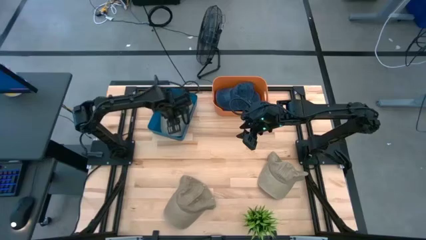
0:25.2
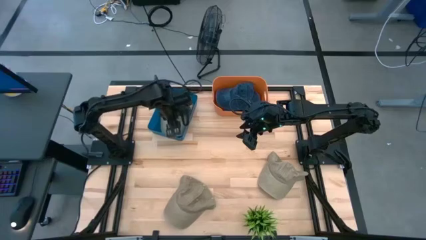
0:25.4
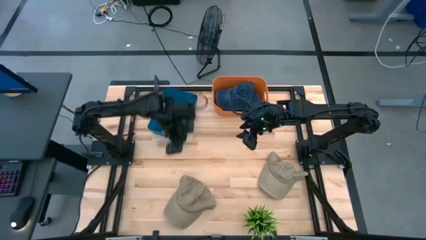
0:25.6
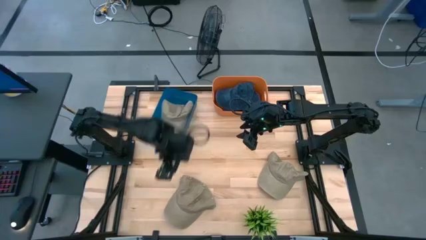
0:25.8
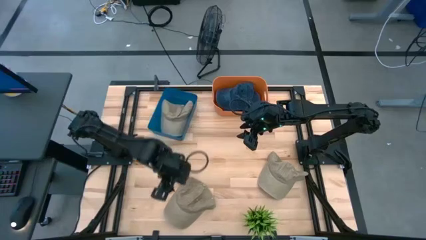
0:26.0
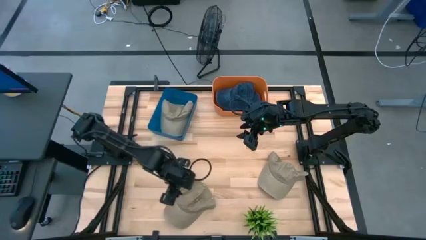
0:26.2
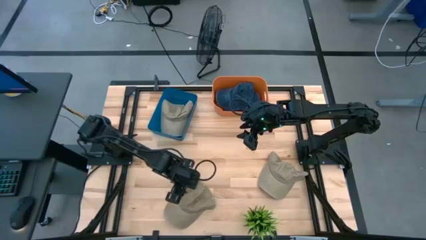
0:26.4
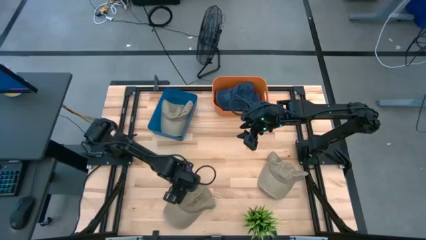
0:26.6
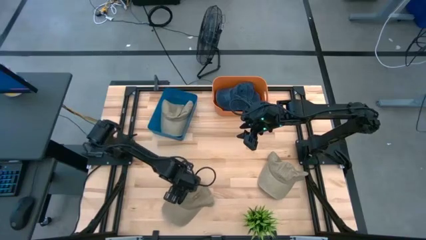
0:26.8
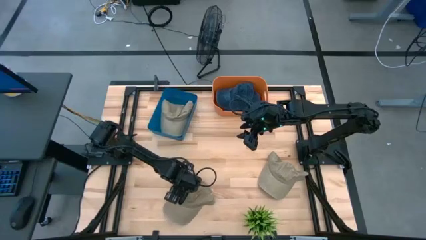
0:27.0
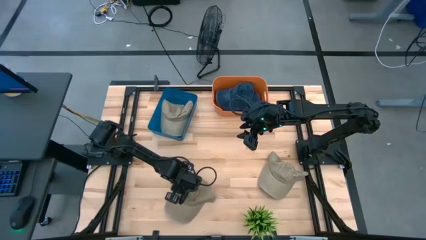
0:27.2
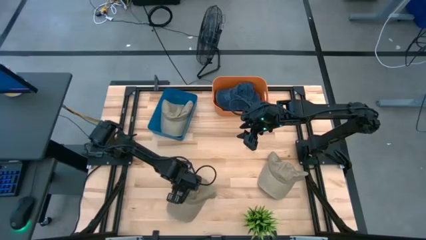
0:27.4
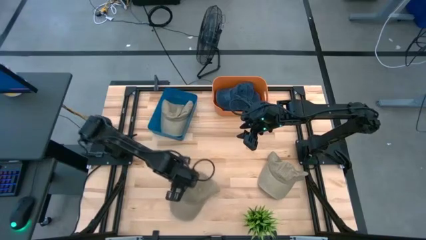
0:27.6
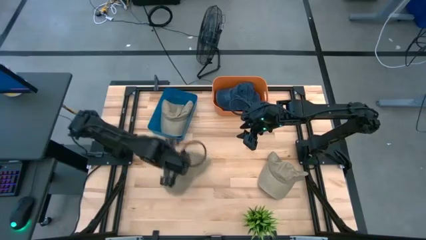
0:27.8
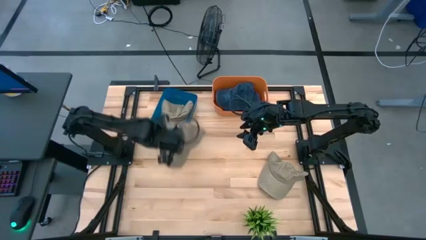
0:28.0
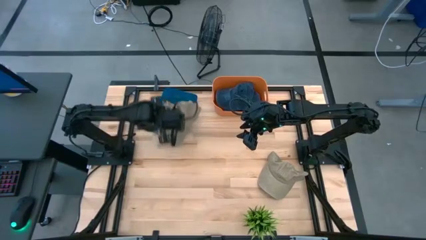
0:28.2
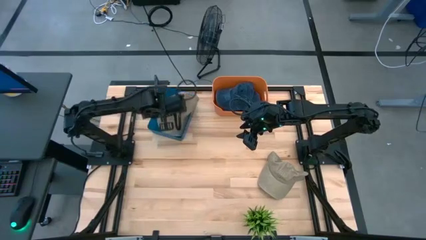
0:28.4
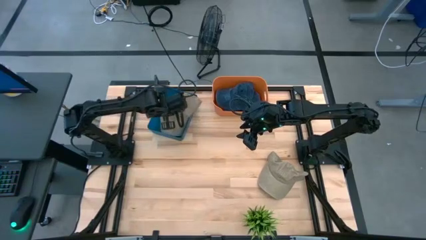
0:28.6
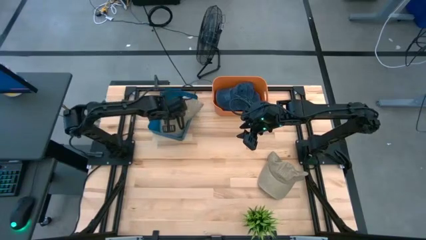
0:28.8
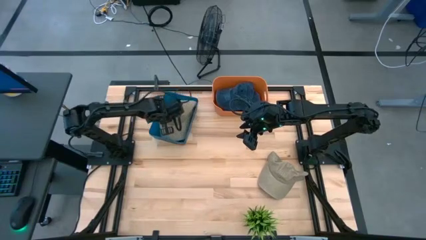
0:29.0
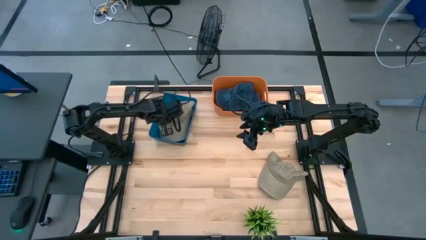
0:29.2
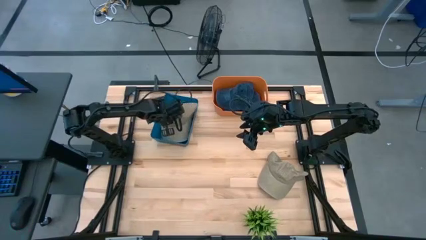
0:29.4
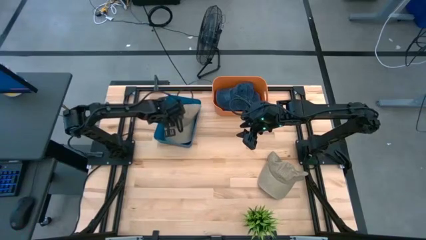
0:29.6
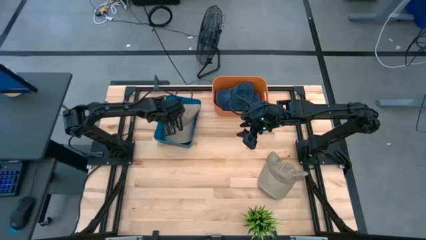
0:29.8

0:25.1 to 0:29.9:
Task: Pick & Place hat
Put the left brown cap into the blue bin

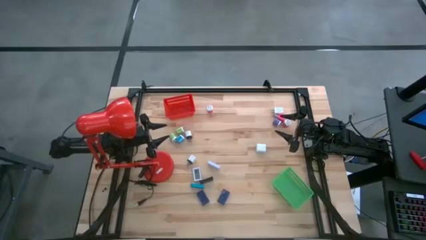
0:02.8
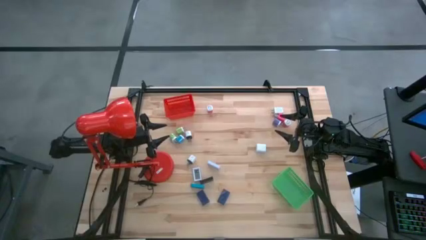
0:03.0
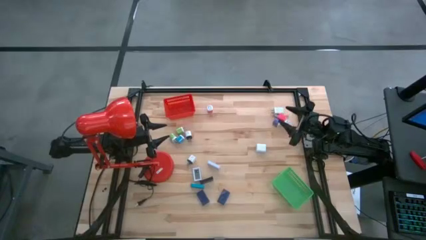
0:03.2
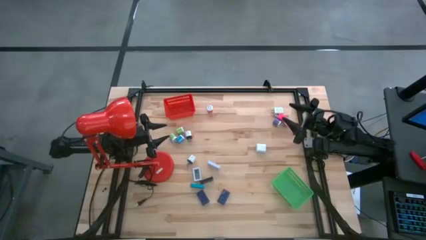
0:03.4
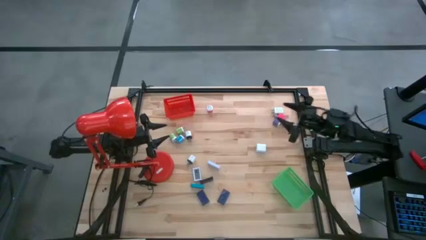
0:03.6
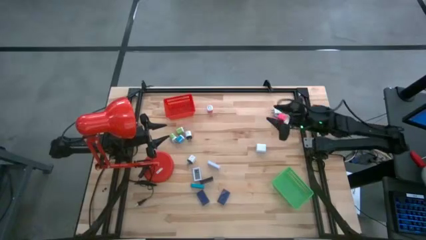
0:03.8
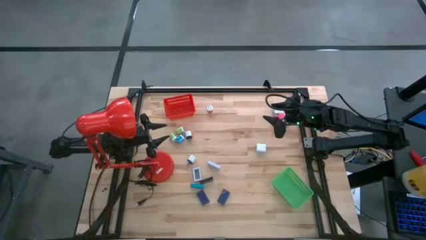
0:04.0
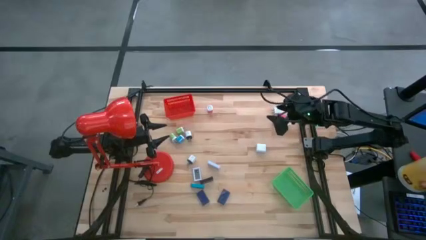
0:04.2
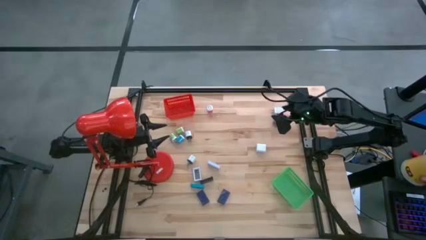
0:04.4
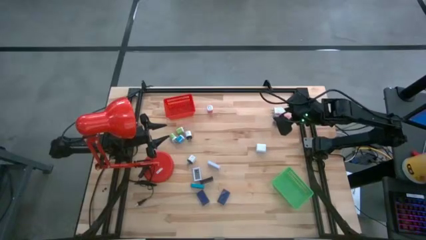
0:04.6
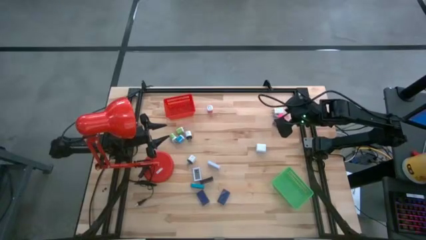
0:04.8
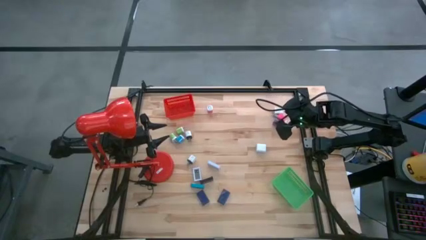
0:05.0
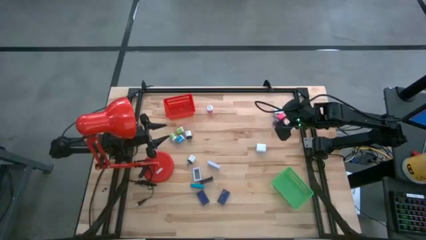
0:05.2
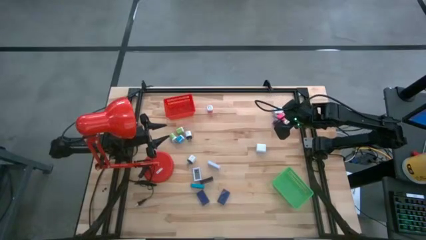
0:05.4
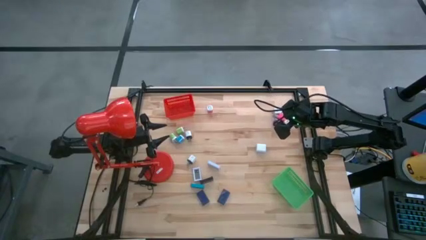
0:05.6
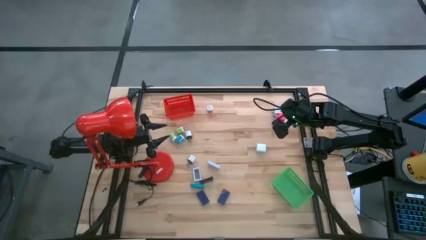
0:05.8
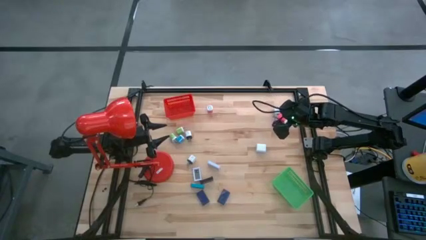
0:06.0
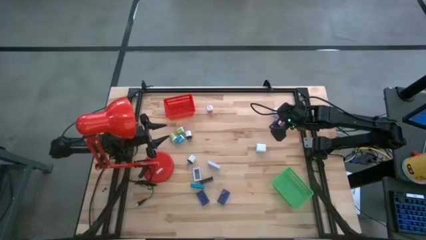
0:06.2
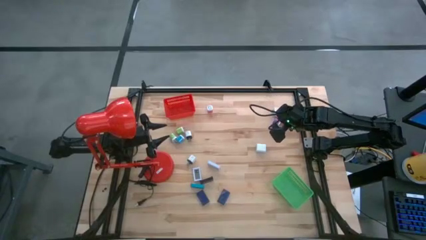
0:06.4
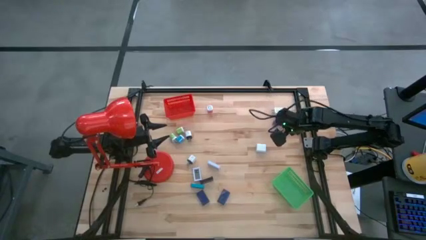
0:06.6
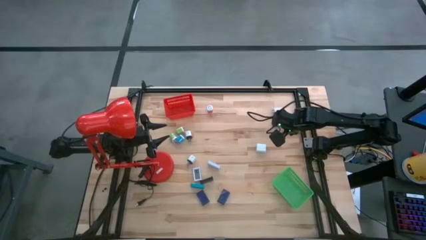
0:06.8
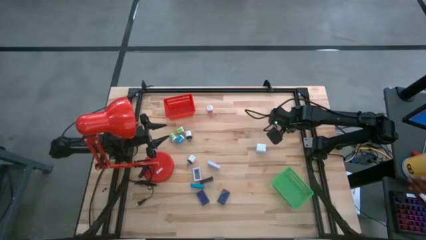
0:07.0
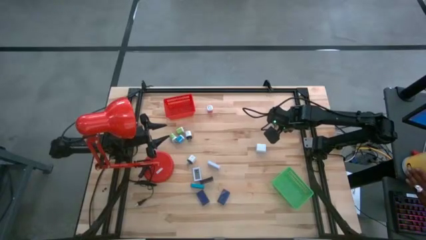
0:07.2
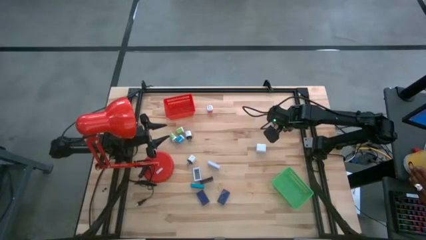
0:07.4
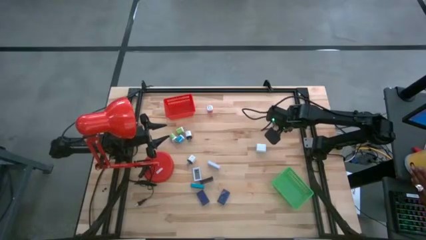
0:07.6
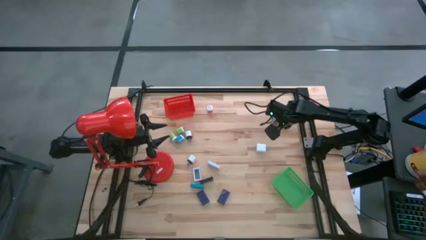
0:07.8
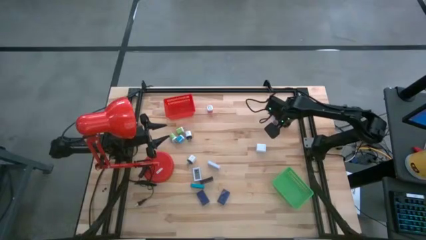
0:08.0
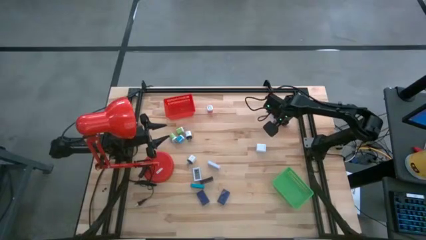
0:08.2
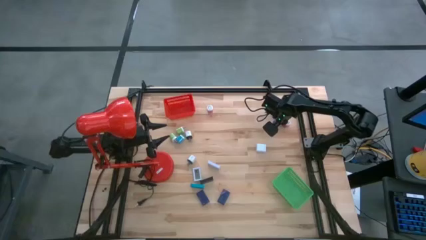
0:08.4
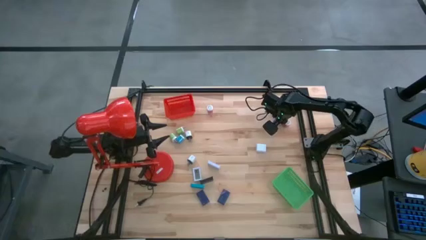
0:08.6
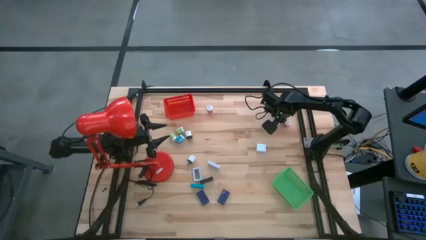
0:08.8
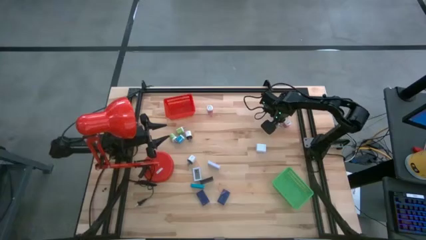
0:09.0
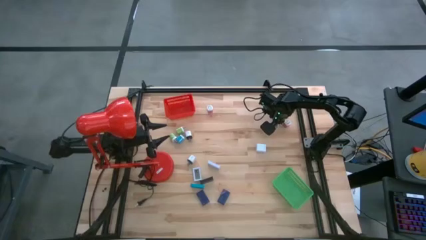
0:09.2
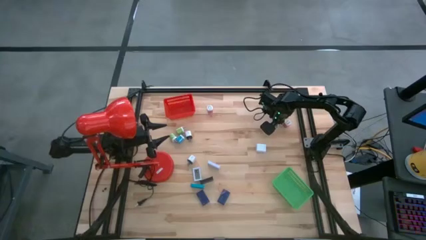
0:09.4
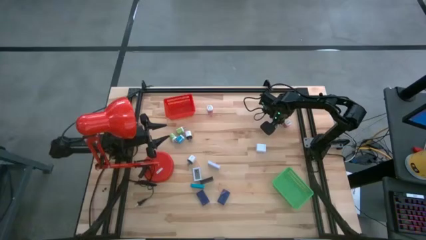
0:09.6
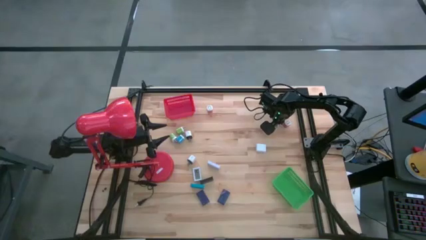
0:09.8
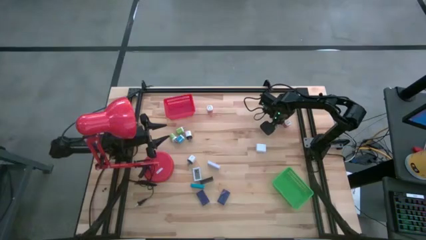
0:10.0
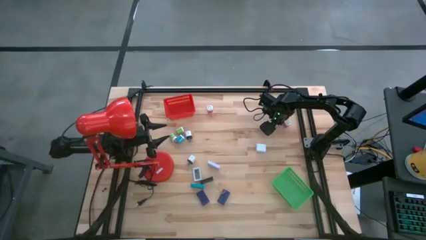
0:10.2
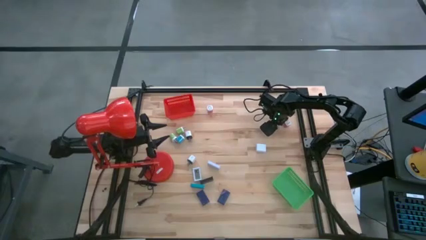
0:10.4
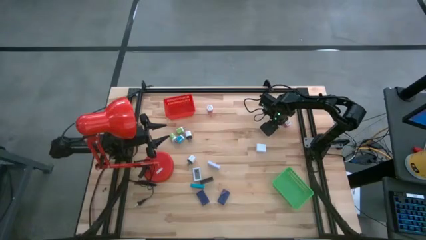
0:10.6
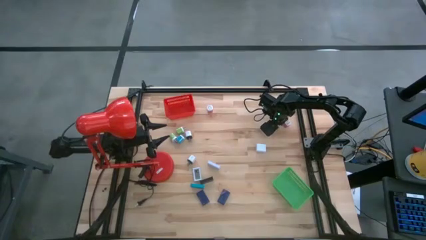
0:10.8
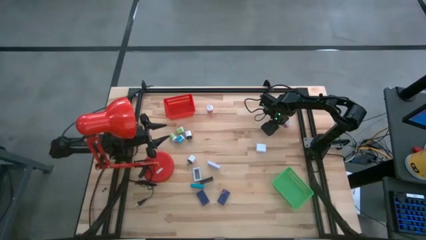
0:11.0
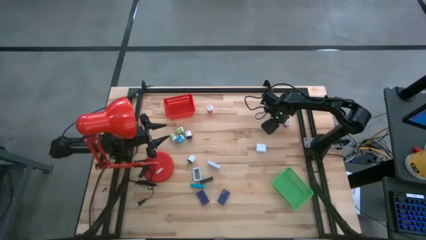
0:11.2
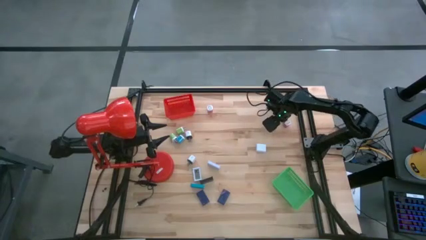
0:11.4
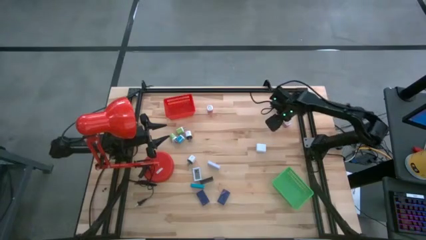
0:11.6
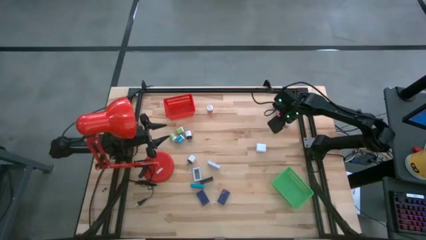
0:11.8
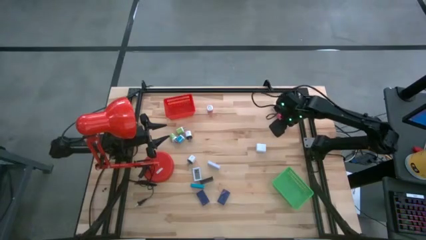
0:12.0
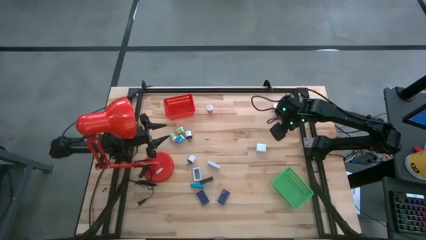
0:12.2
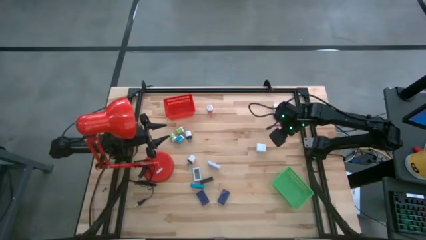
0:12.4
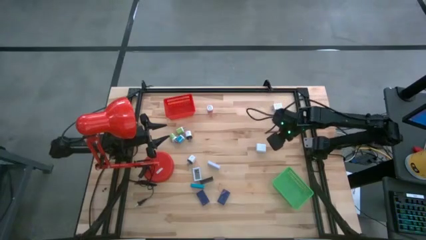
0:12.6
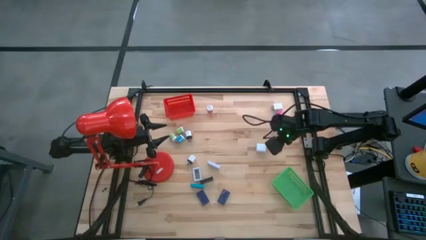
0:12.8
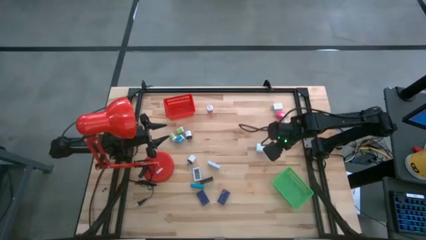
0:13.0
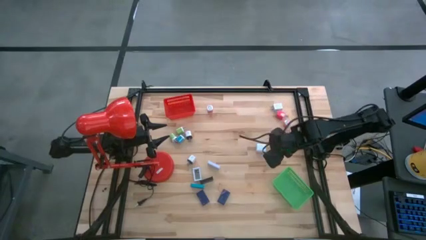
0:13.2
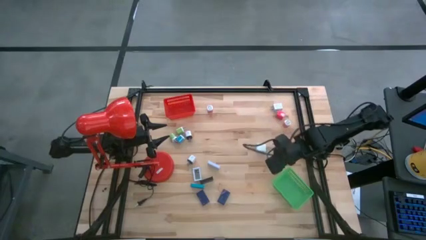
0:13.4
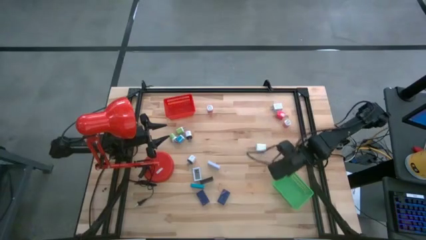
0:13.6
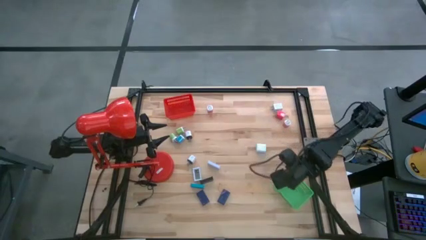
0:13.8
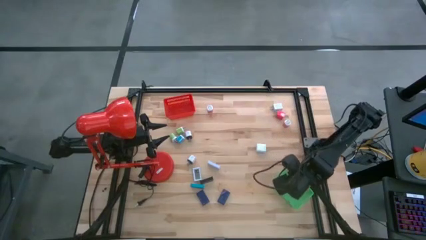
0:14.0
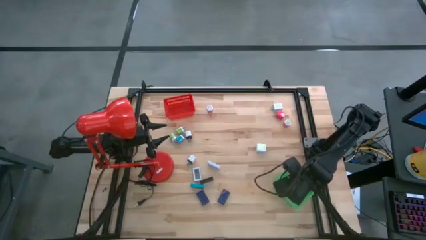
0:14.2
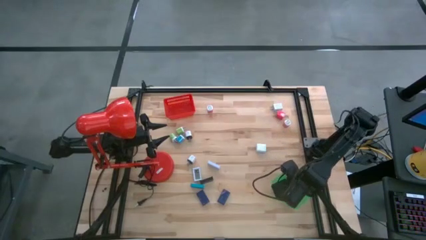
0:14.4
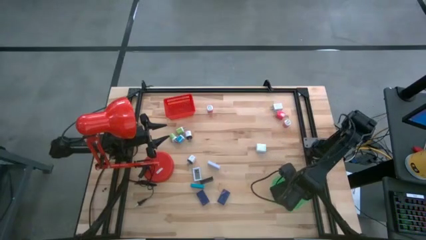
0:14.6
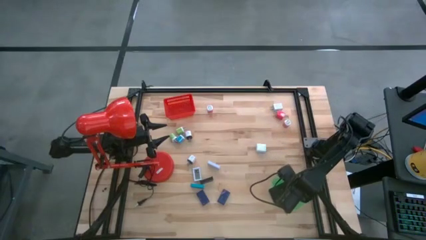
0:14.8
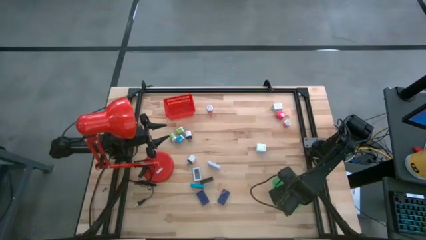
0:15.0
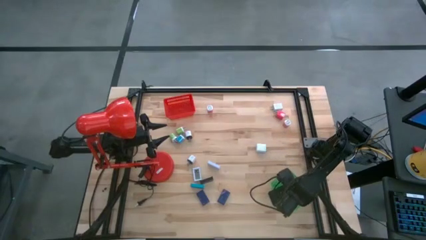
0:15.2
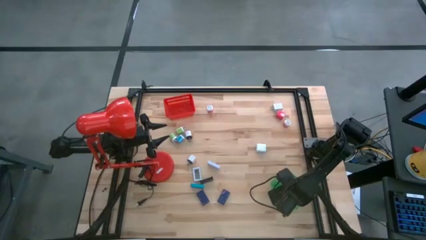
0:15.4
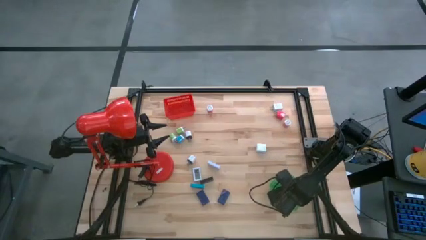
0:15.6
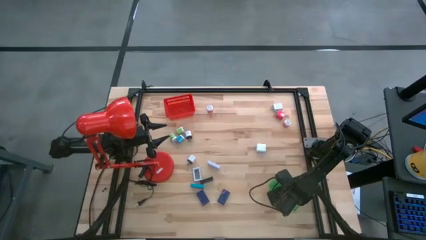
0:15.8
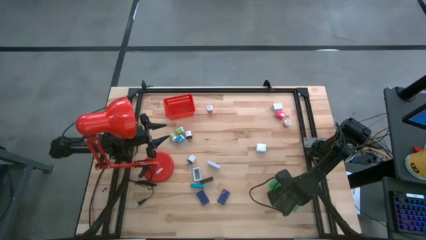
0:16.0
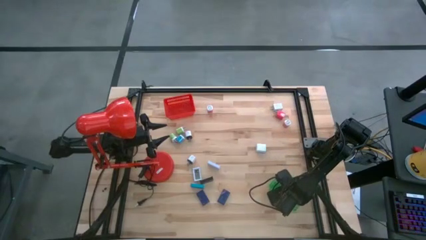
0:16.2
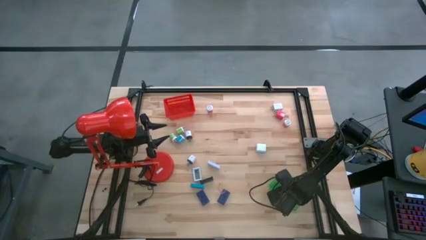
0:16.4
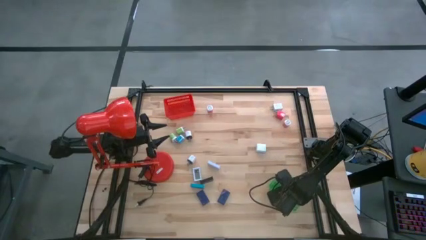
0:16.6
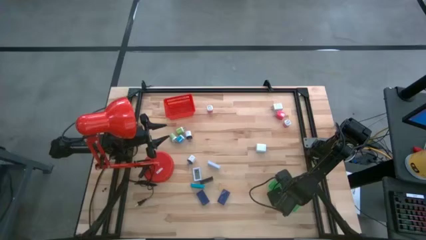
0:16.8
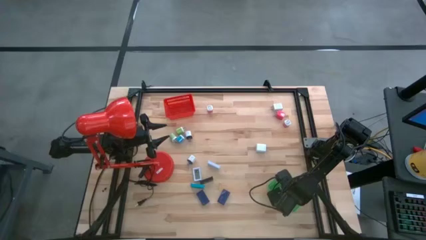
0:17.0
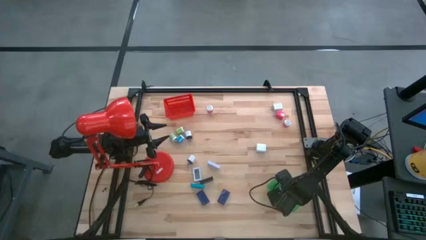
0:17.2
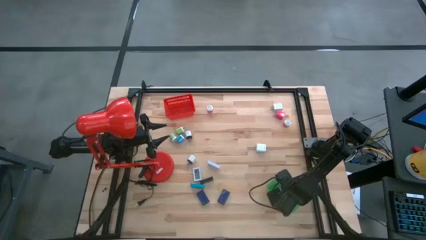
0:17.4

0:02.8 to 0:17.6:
Task: Pick & Place Office items
Put the purple charger adapter into the green bin
